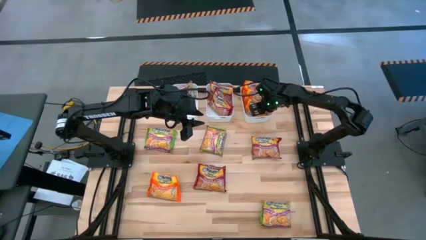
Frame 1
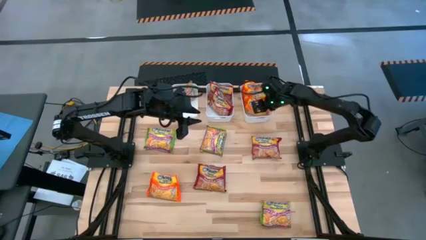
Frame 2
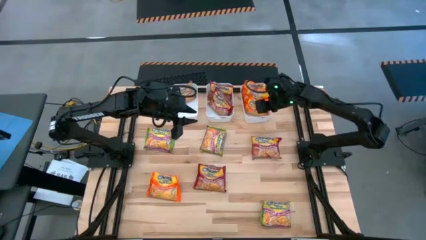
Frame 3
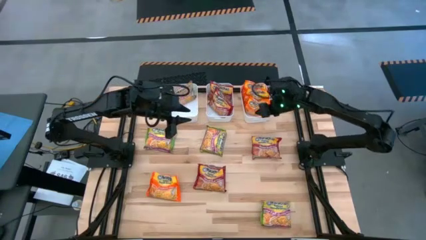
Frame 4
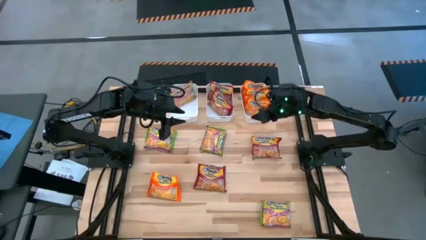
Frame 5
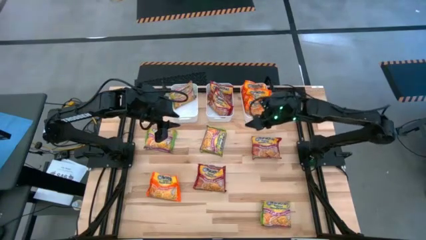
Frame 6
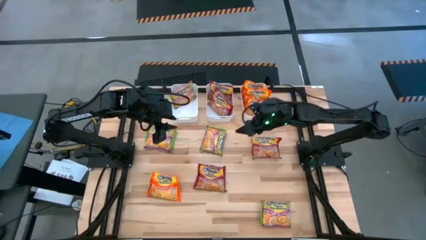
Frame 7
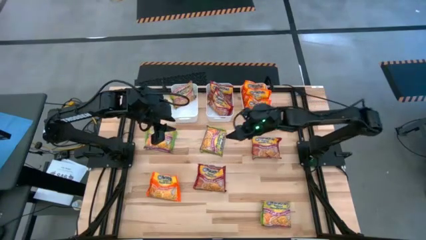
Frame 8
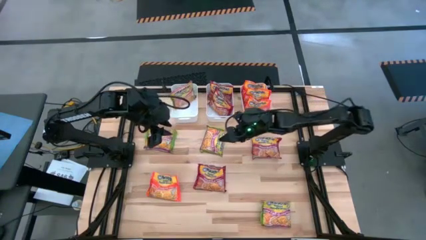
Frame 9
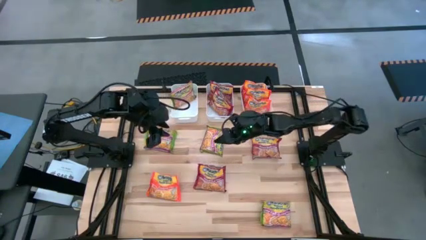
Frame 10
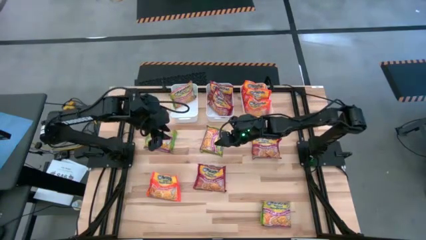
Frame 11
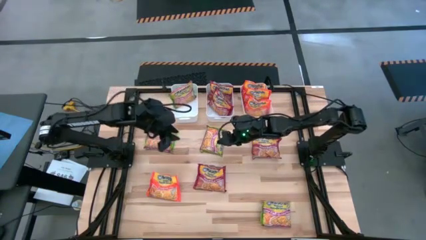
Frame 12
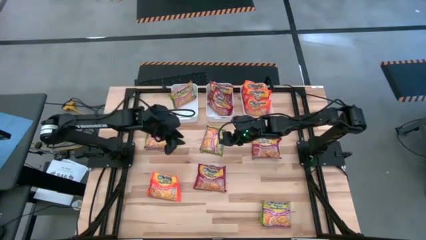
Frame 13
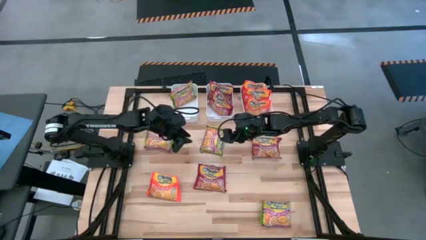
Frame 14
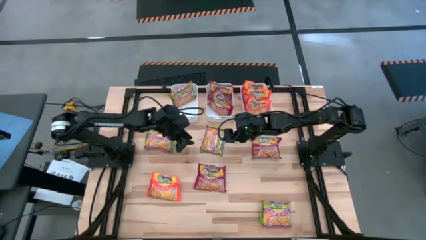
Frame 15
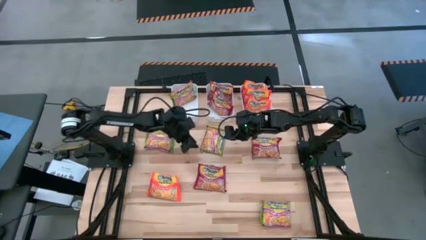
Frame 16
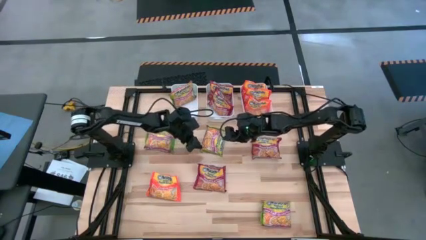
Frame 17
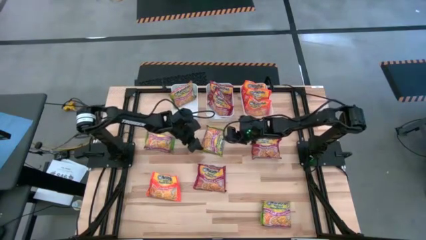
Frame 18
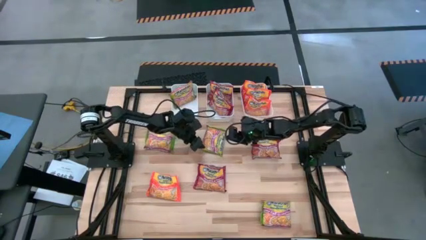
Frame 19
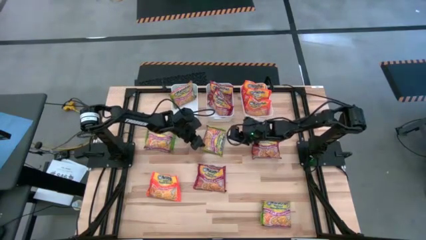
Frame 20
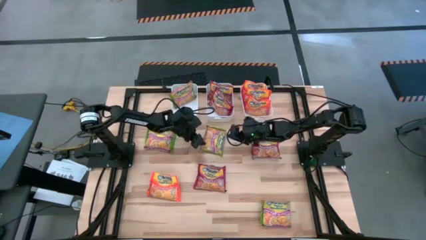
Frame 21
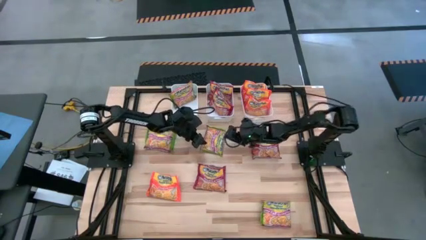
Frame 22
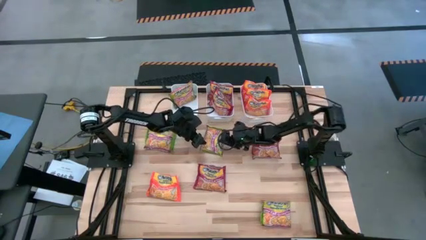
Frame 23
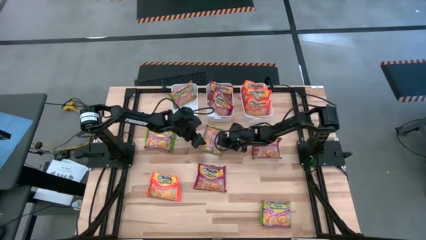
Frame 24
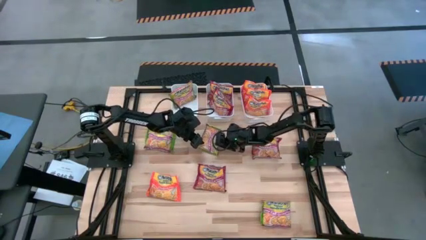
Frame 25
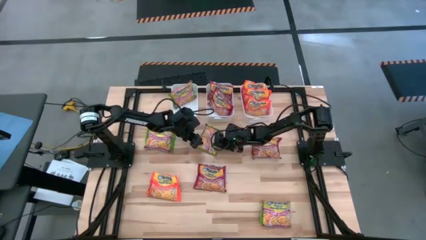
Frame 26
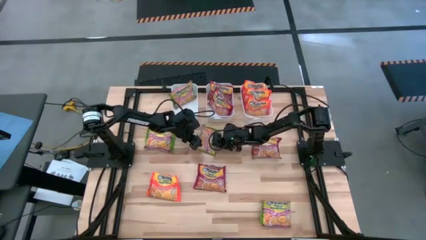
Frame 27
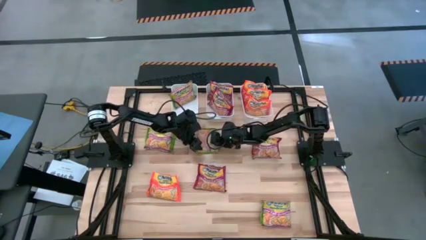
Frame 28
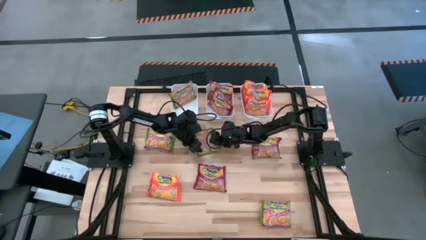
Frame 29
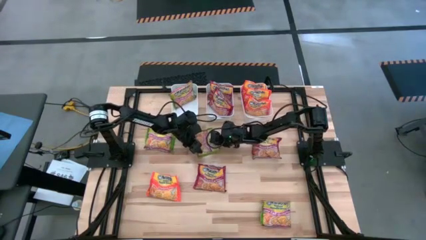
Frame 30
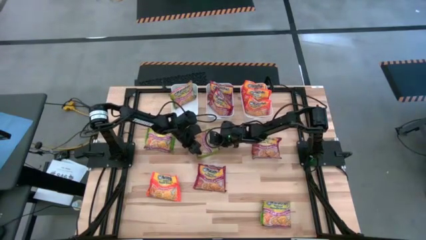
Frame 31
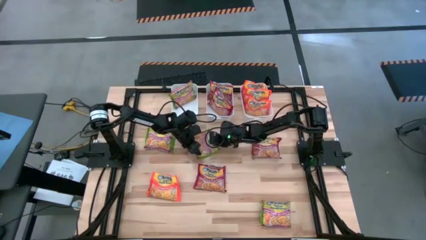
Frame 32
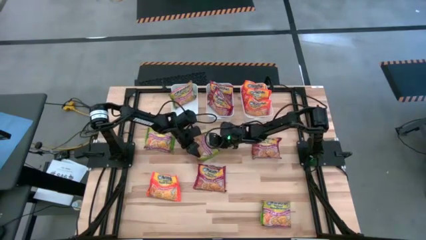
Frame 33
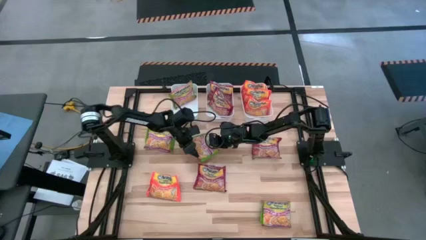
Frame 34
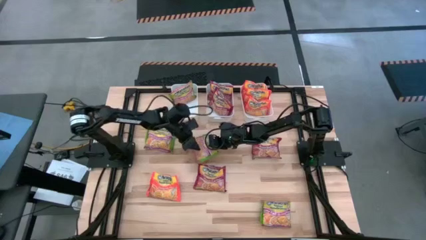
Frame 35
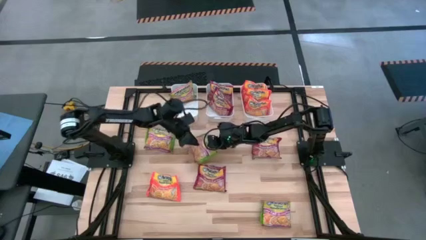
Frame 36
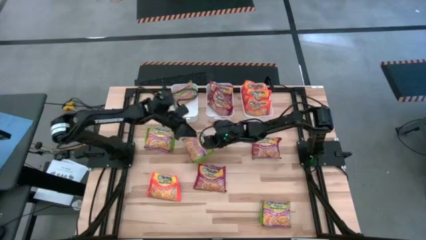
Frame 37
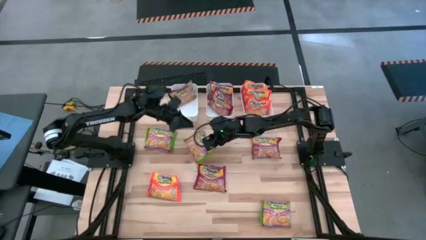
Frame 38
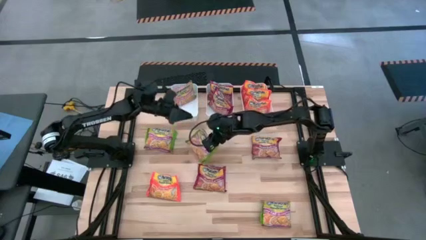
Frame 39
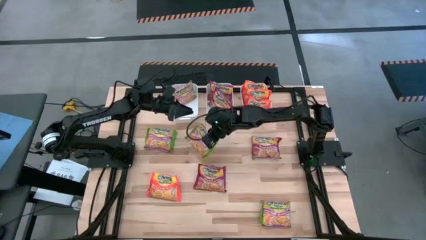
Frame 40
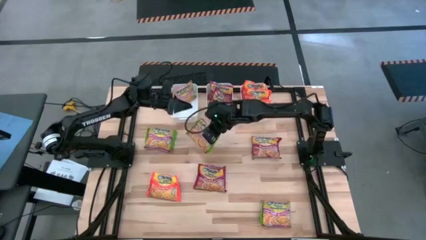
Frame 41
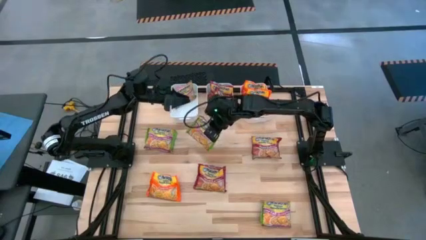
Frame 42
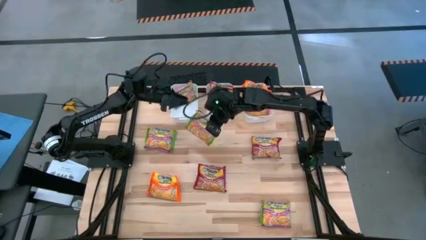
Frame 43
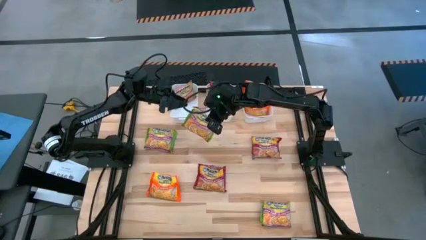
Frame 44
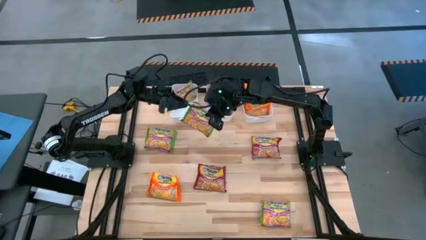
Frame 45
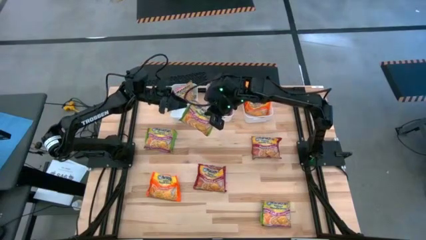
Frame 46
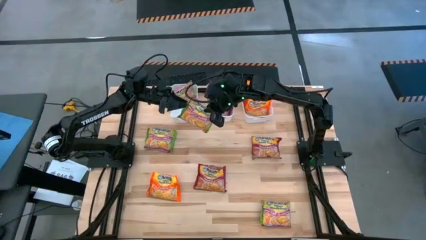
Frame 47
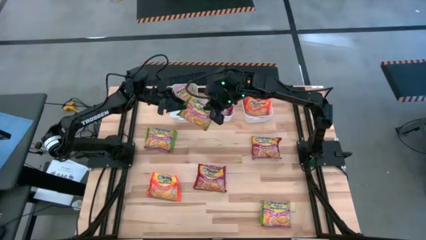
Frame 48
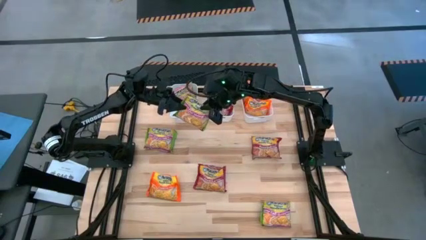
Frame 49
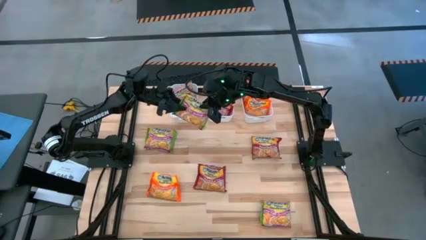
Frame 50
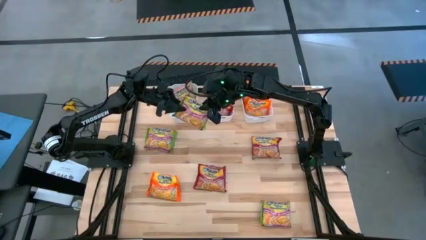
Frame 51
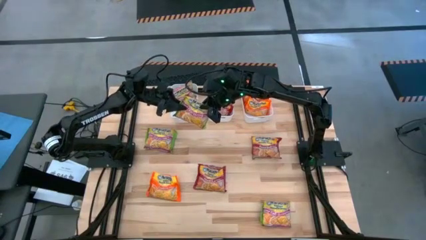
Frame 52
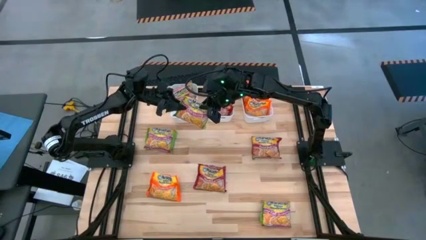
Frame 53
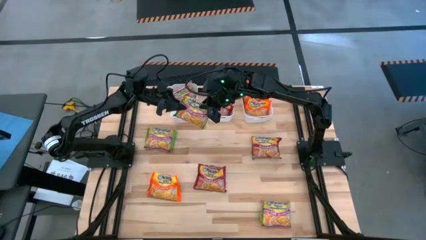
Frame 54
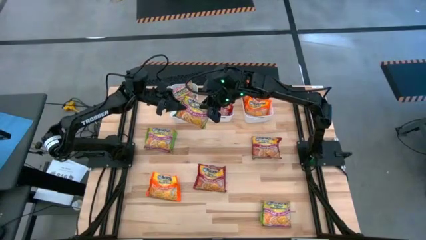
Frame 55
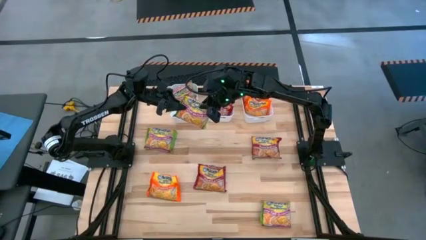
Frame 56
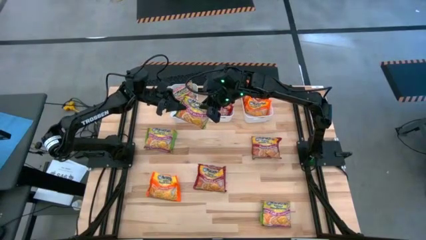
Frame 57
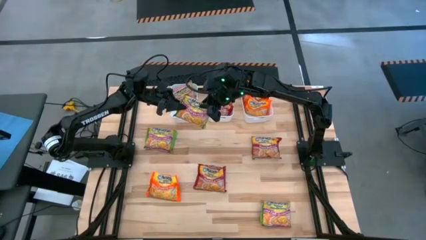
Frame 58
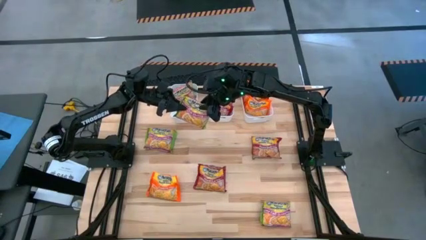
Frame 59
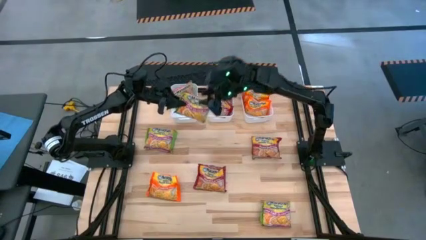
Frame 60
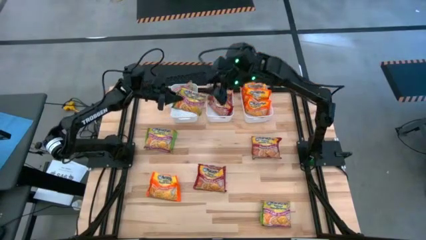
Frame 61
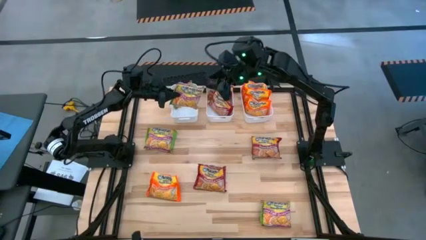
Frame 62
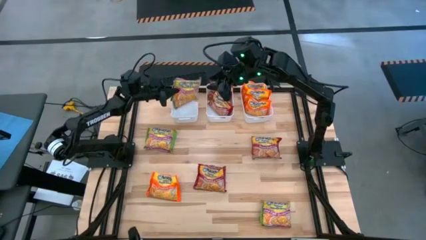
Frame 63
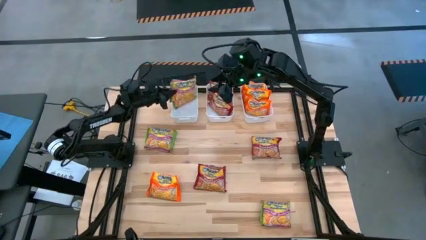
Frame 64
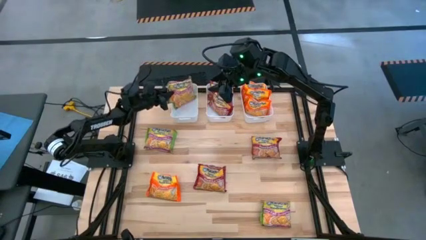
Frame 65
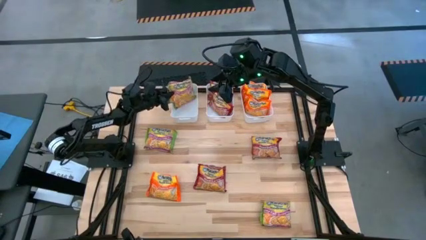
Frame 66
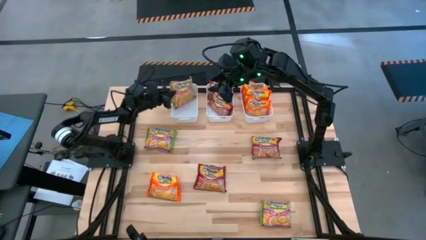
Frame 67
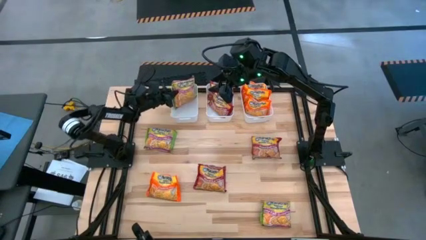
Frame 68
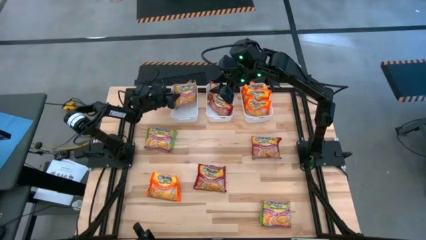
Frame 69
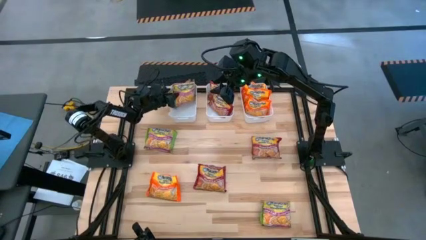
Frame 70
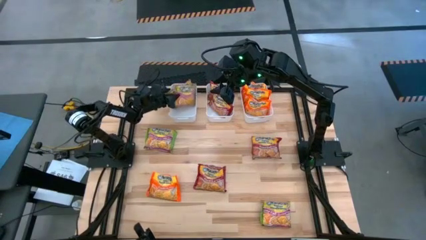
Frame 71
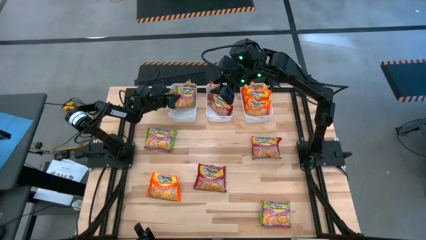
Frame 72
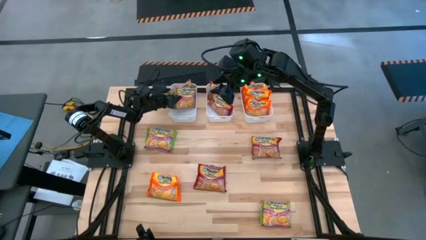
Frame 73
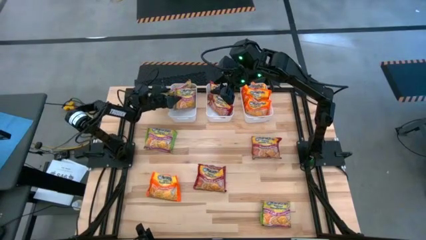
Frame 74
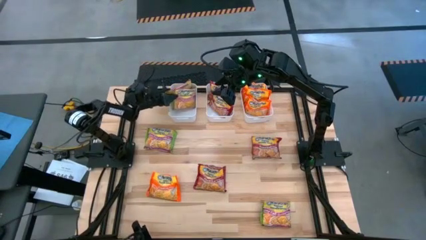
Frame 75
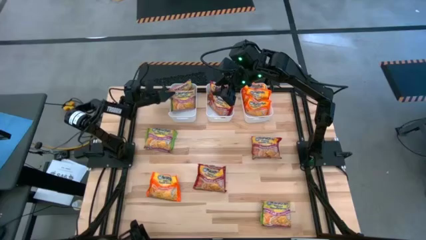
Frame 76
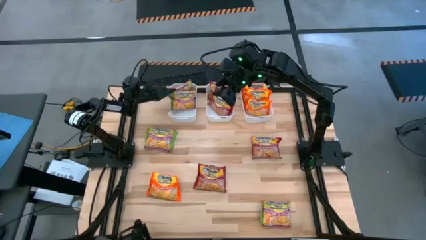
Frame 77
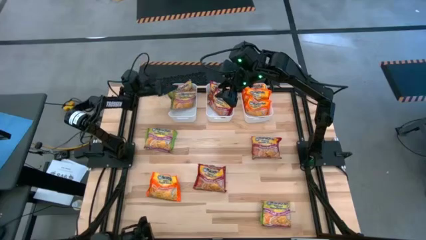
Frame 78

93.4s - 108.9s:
Task: Sort Maruchan noodles
Put the green noodle pack into the left white bin

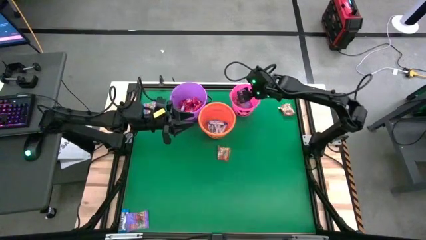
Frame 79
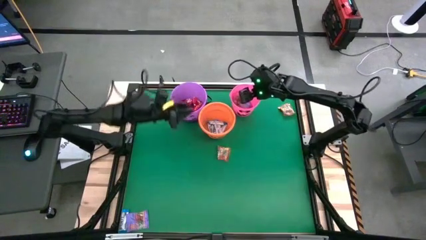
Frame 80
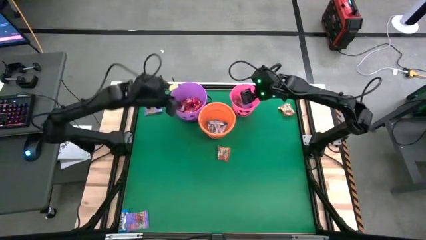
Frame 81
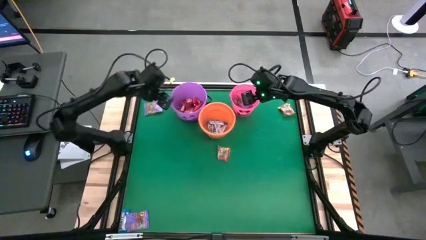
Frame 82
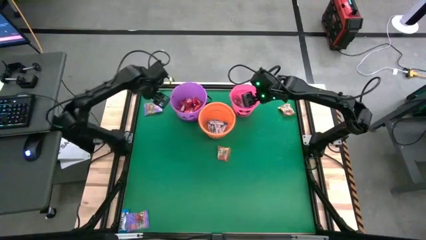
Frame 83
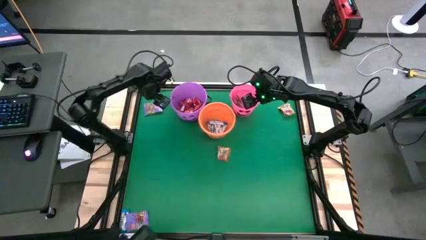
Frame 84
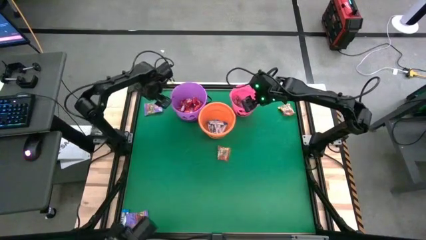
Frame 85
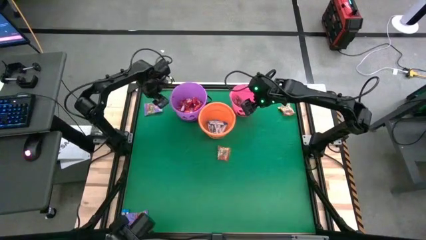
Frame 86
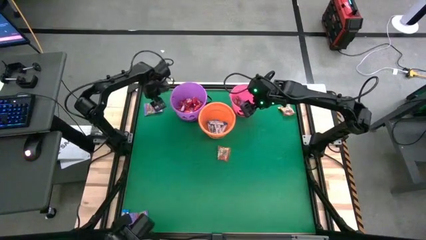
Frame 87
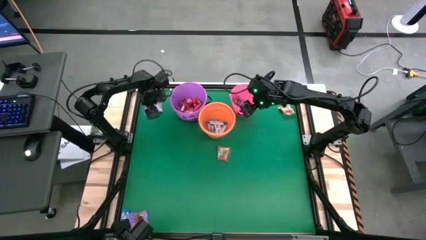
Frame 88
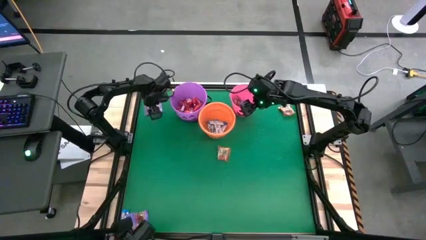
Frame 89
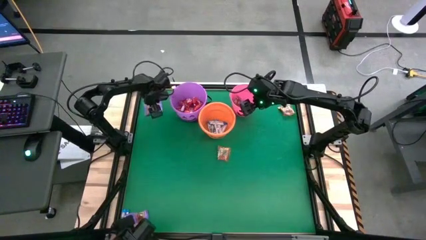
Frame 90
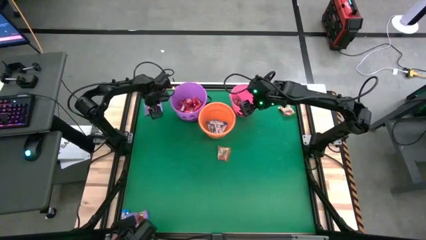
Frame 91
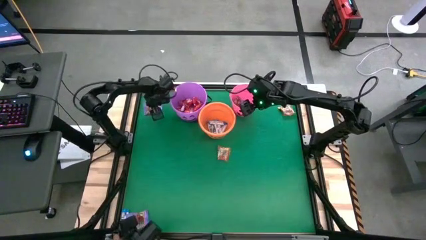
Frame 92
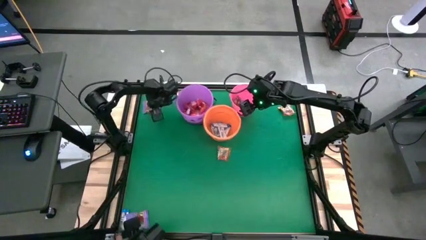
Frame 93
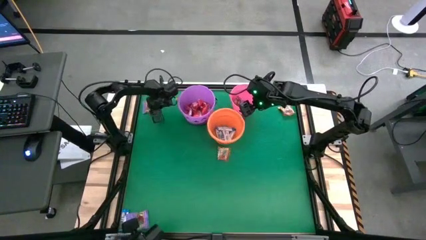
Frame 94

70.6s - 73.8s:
Task: Sort candy by brand, put in halloween buckets
Put the violet gummy candy into the pink bucket
